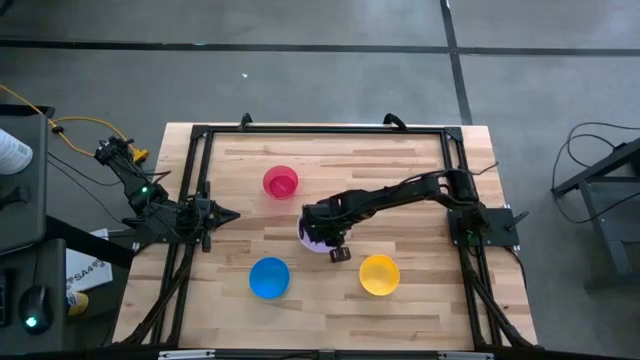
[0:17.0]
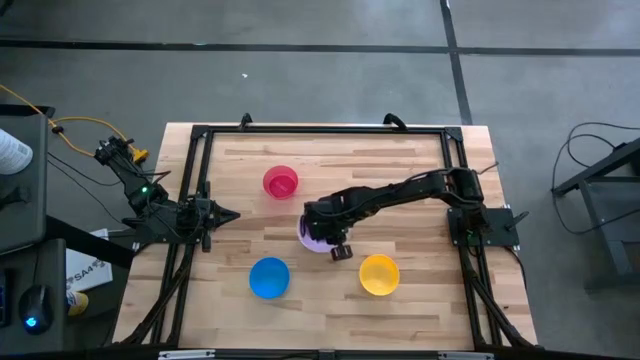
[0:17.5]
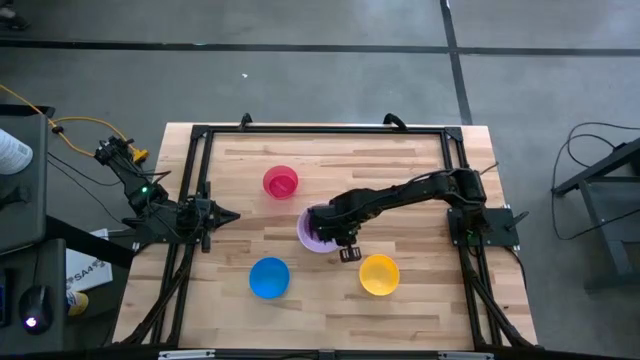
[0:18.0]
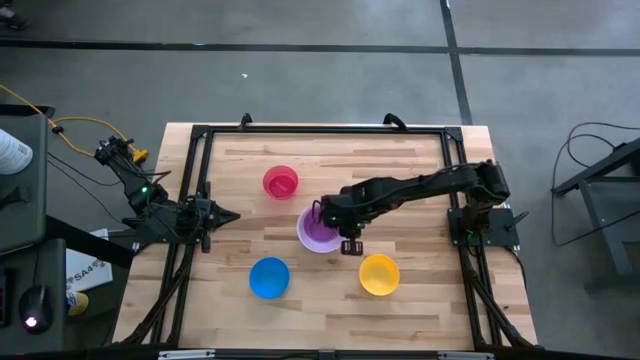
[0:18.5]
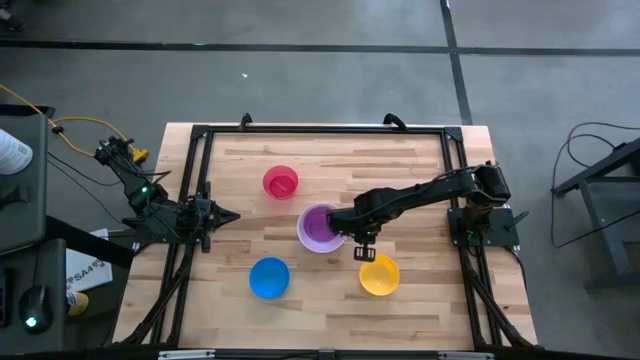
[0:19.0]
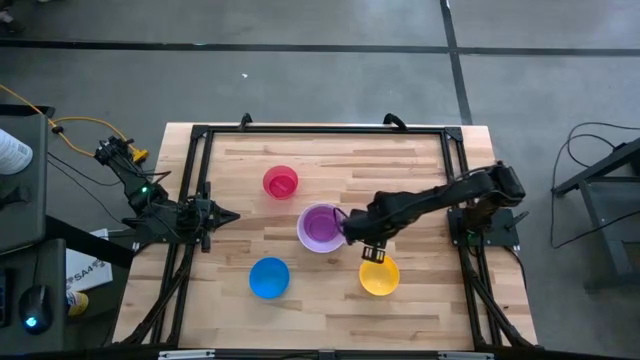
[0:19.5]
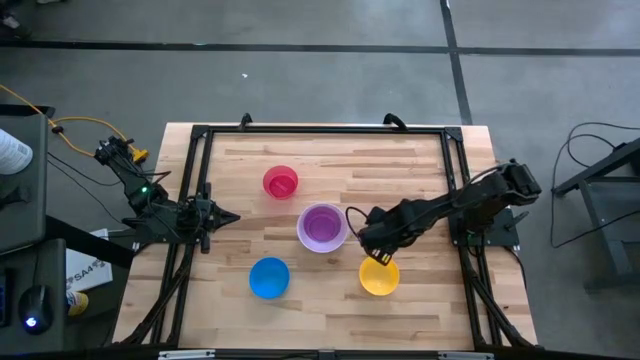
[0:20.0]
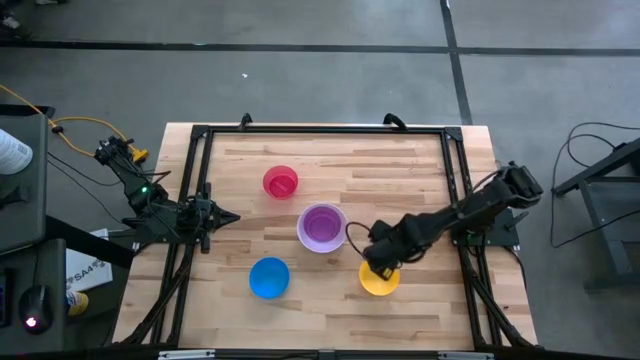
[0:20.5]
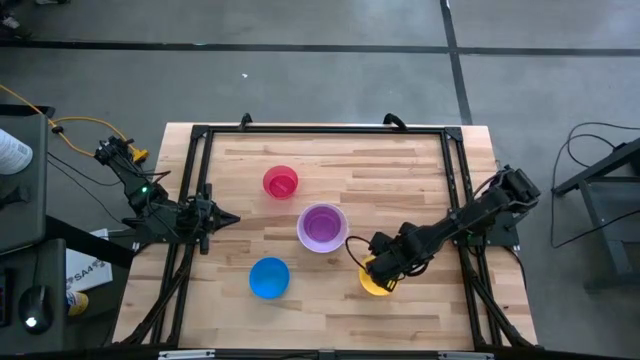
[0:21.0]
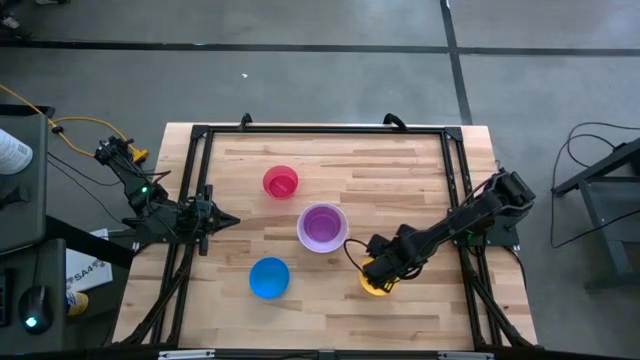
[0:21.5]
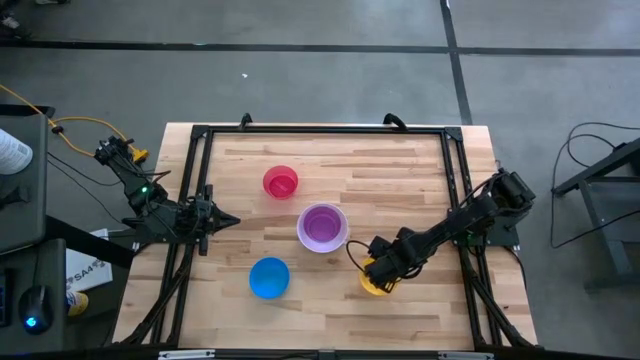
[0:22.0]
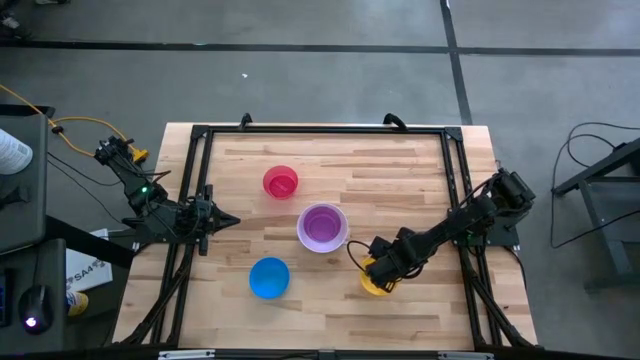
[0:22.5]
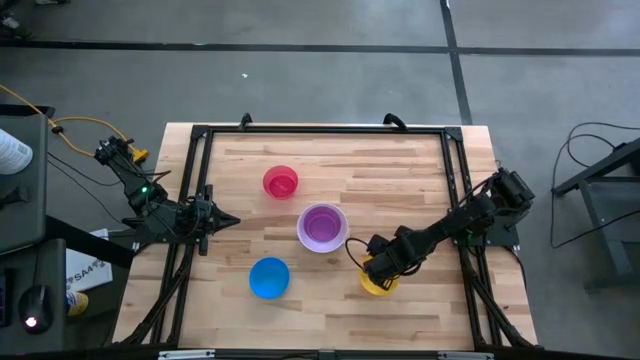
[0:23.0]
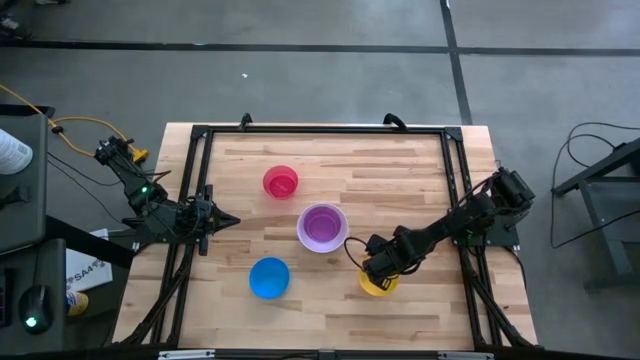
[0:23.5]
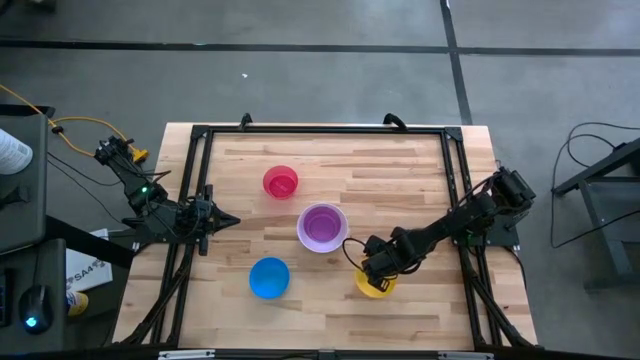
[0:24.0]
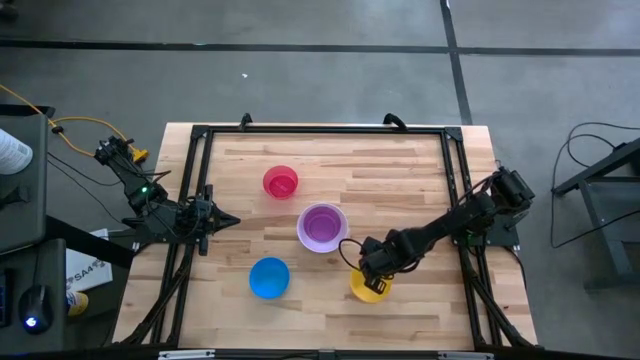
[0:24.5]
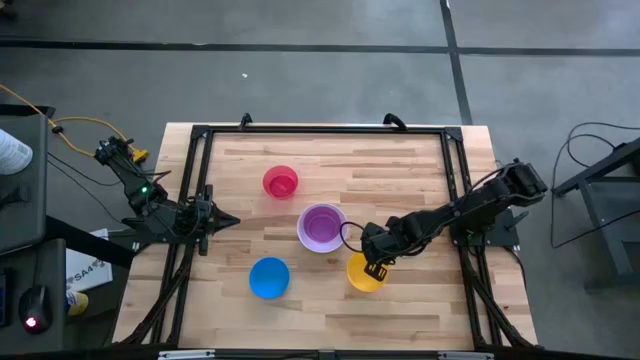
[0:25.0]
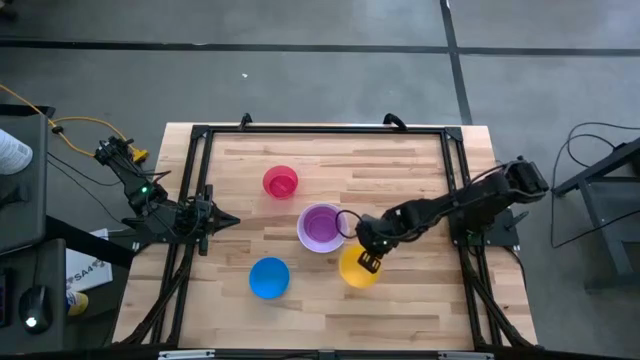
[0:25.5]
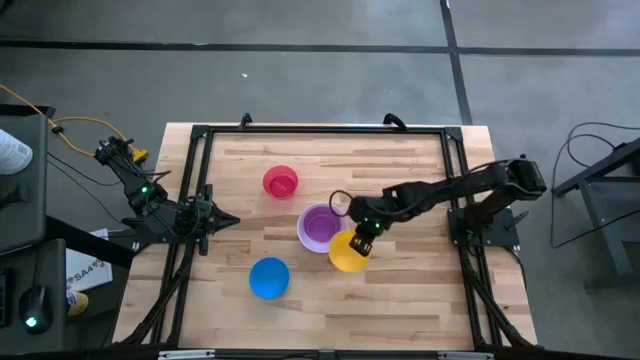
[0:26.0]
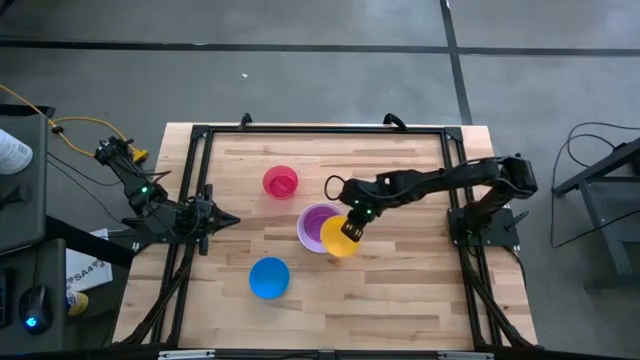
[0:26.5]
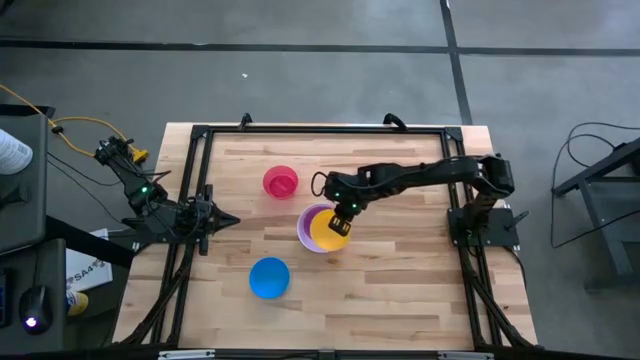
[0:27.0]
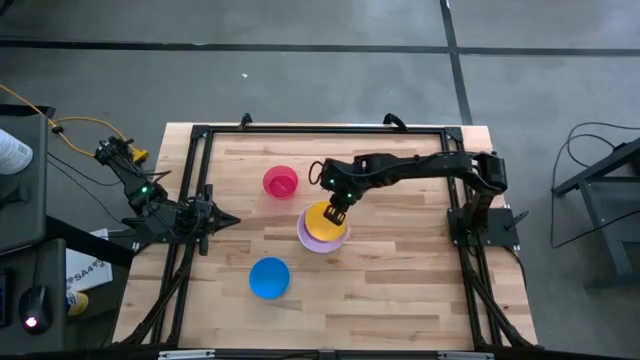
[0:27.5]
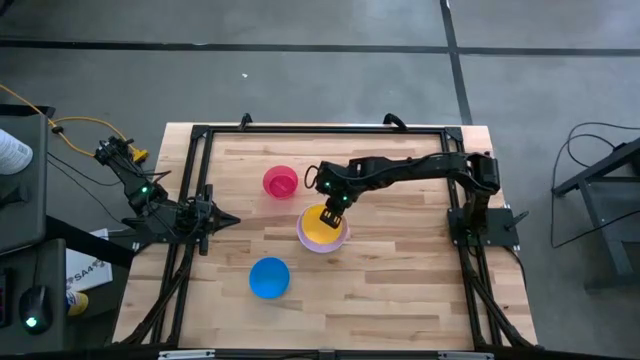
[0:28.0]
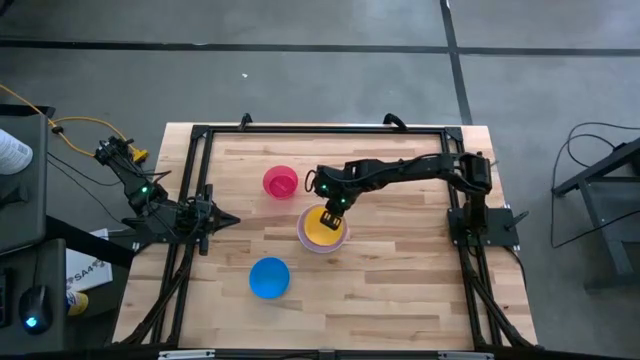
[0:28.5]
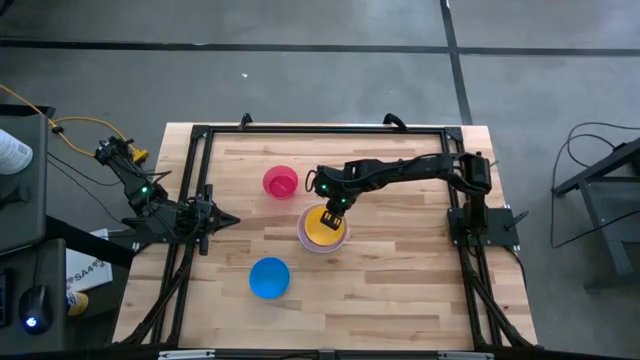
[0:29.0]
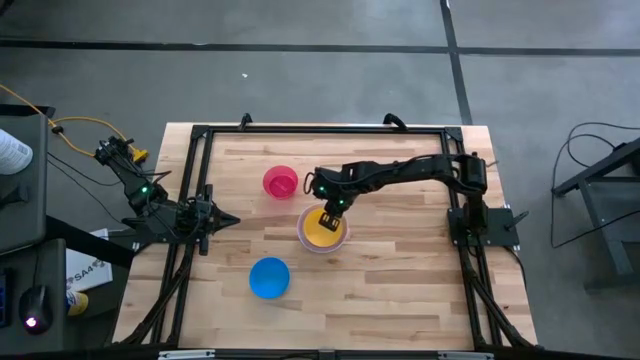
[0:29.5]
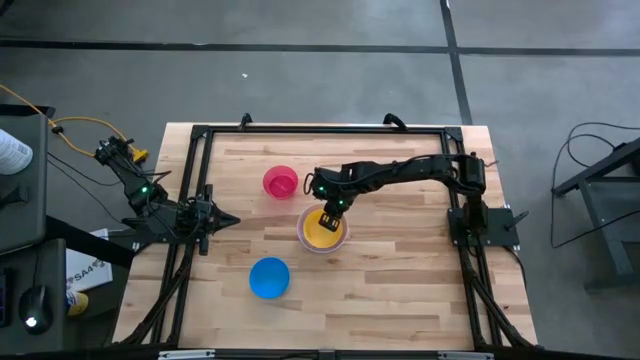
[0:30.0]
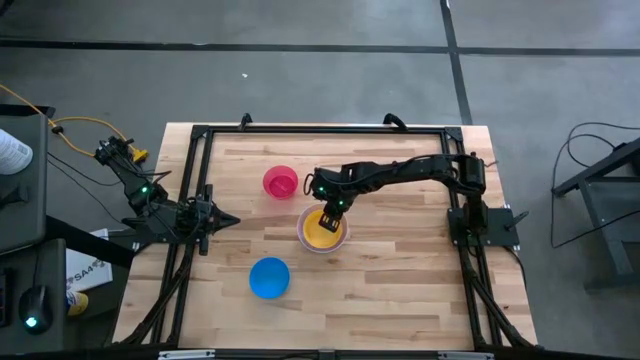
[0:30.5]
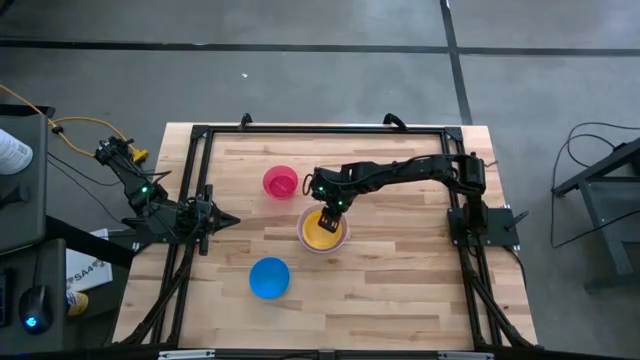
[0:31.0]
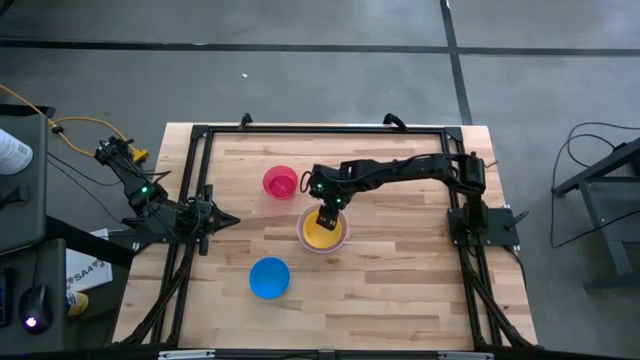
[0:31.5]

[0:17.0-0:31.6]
Stack the yellow bowl on the violet bowl
